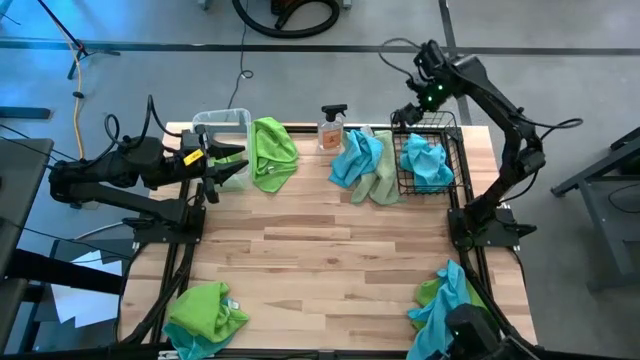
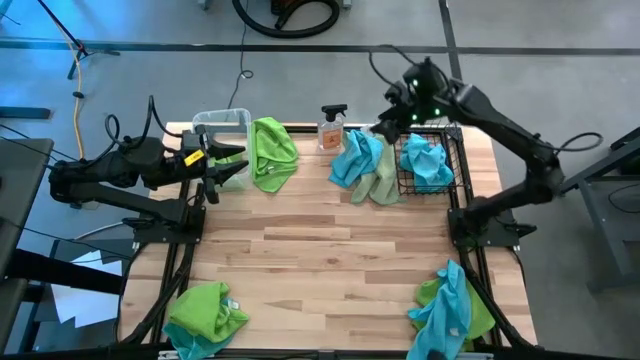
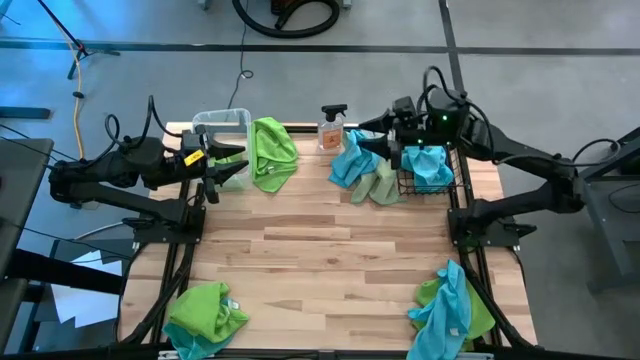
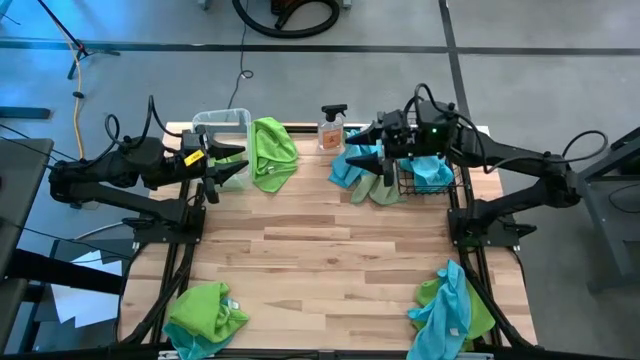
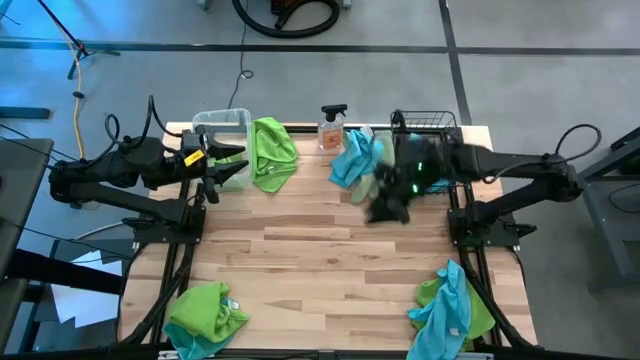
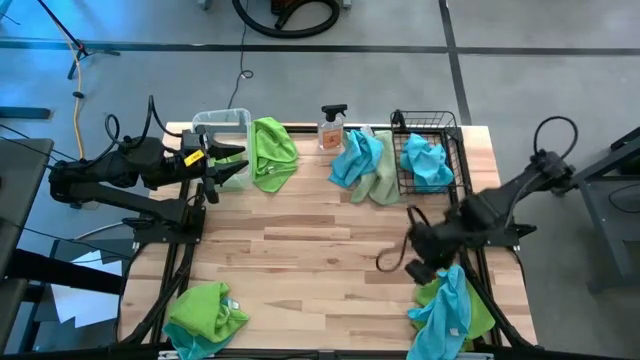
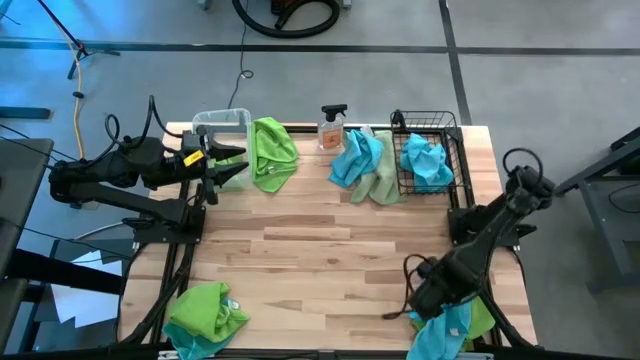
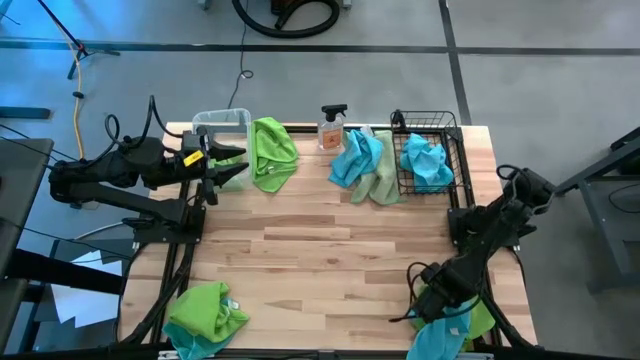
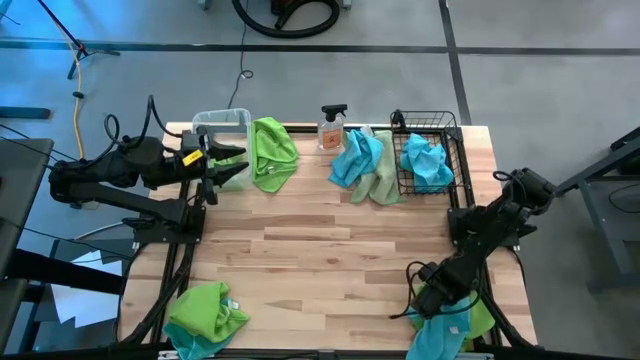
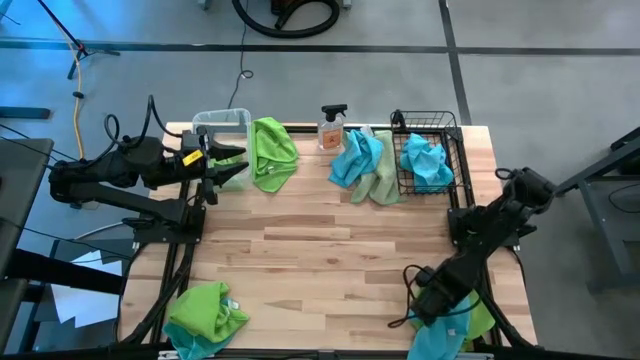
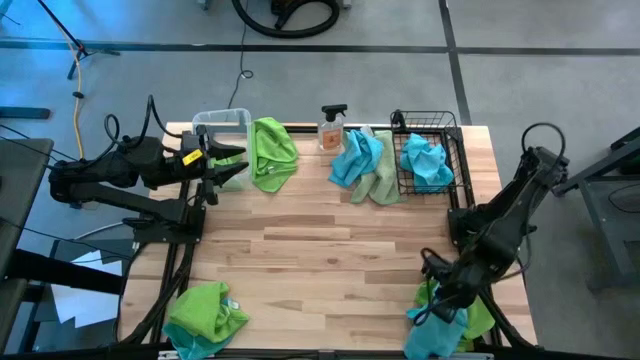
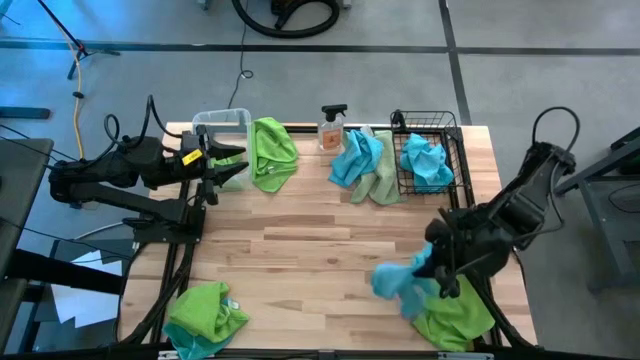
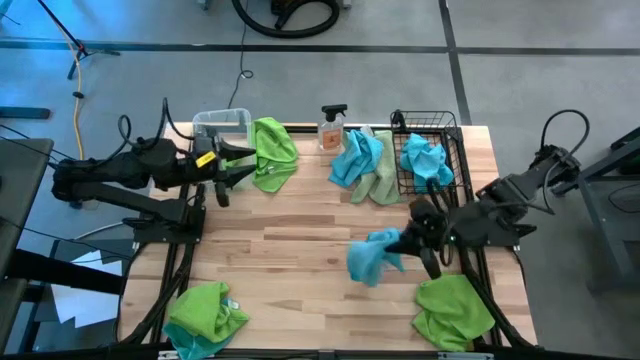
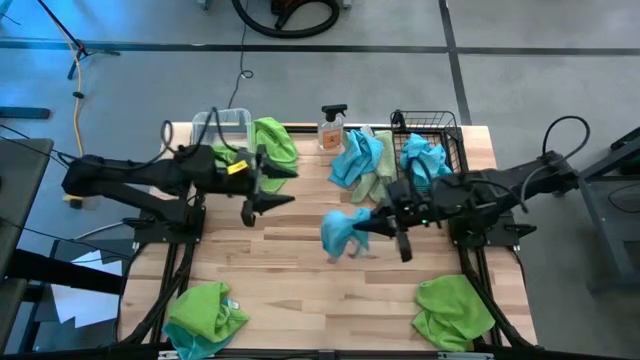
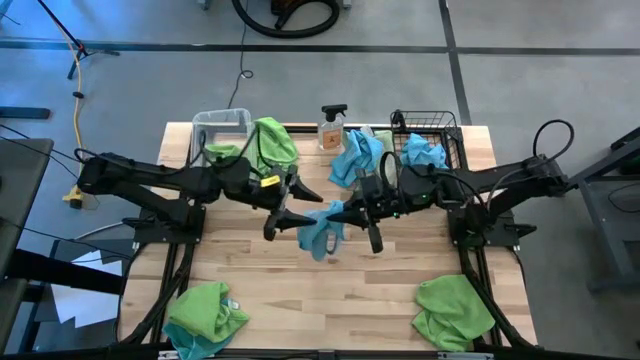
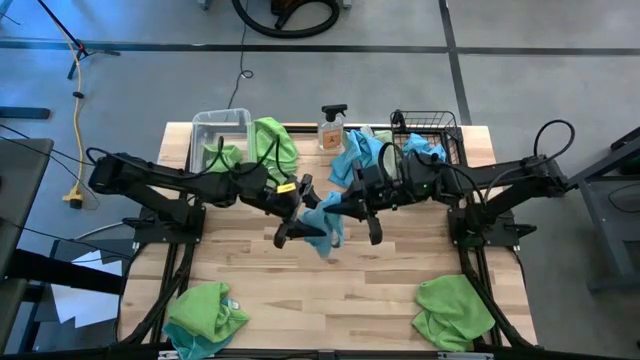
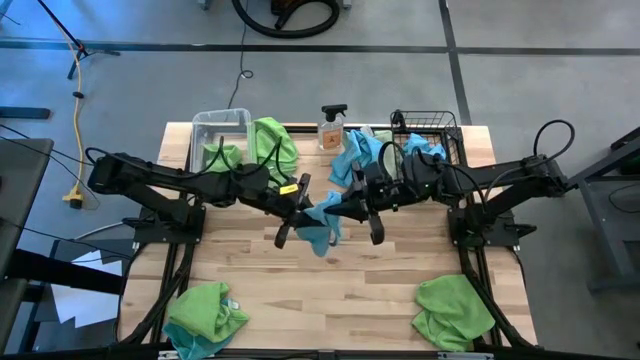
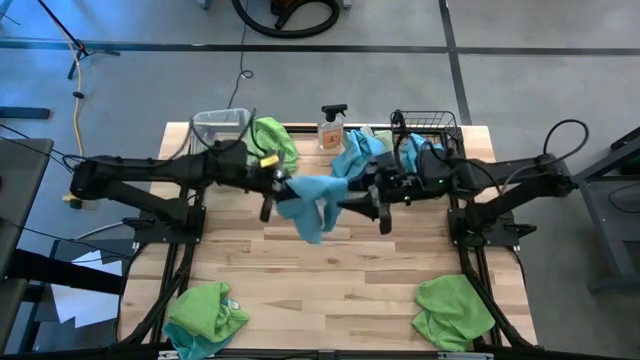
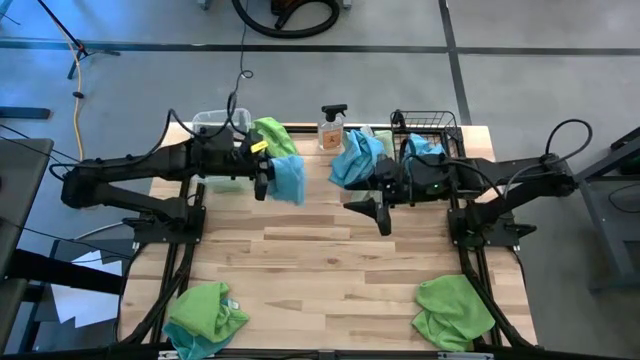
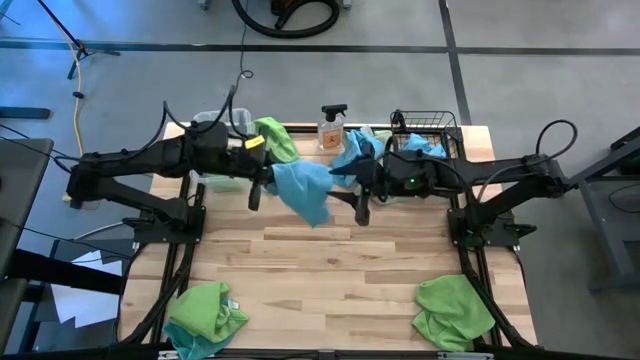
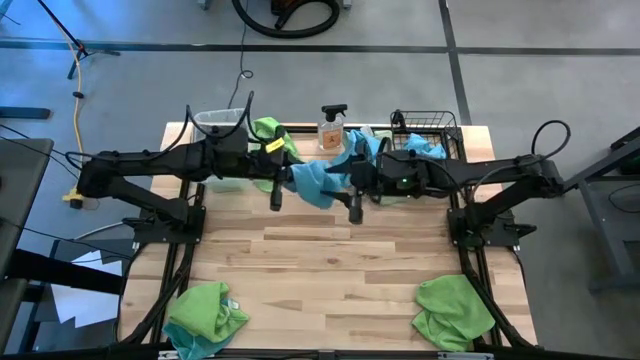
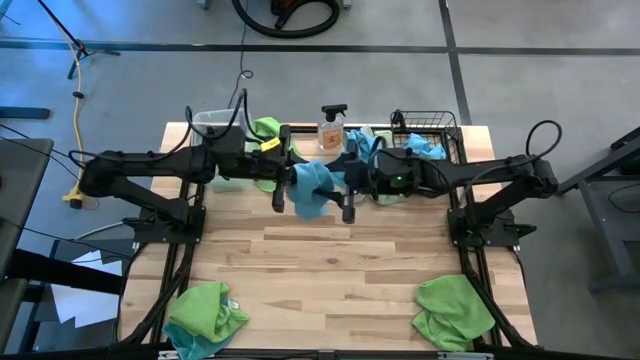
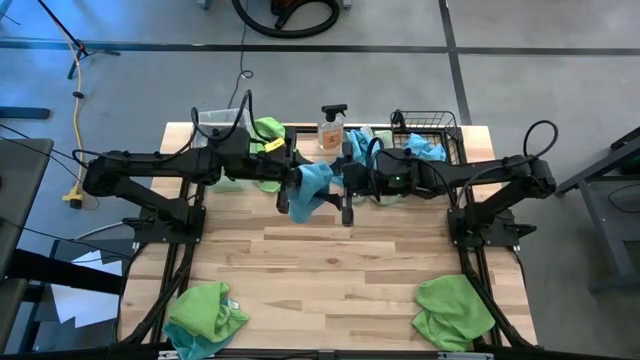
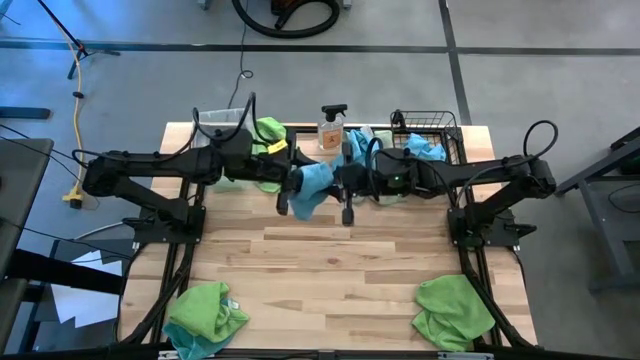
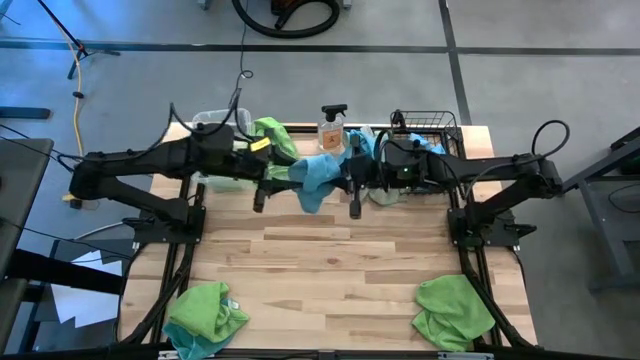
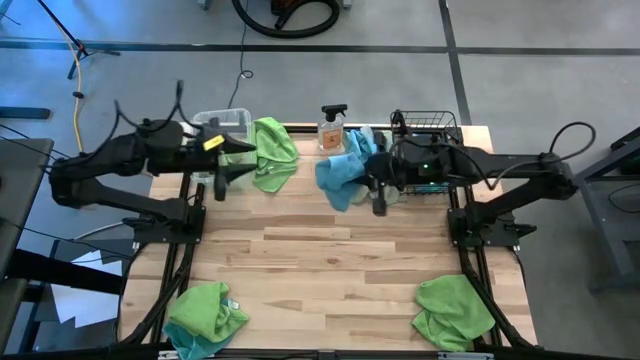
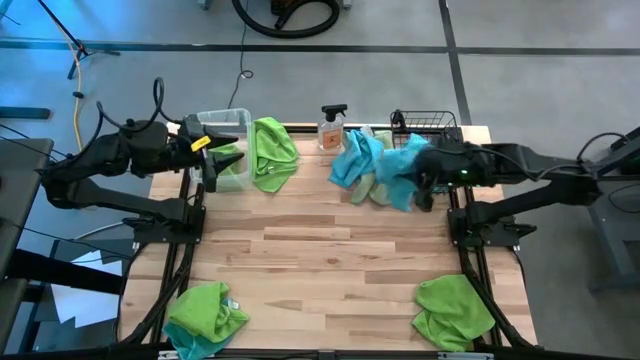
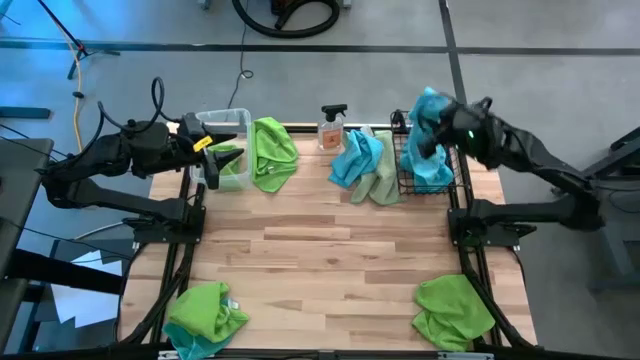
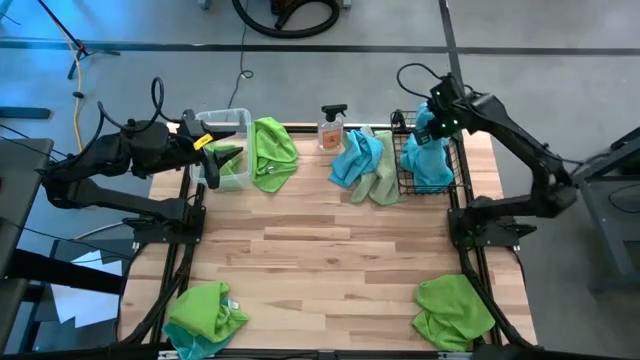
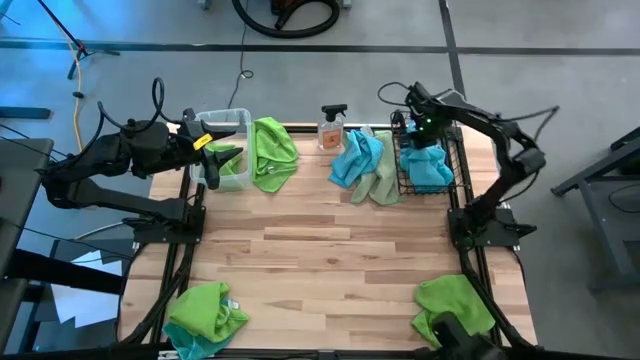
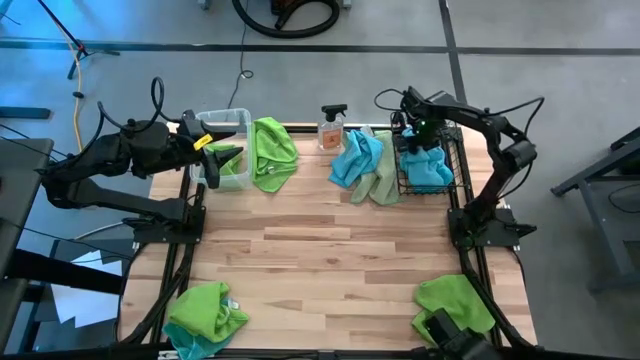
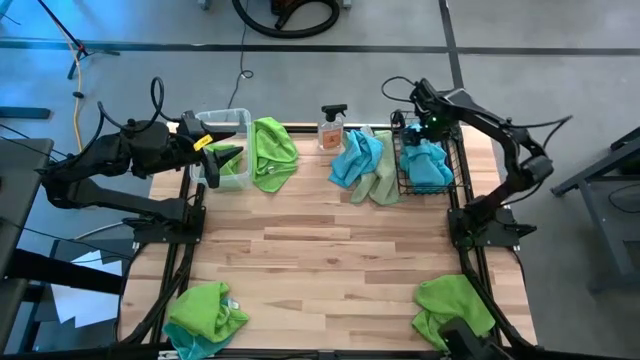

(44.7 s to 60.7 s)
Task: Sort microfiber towel by color & place in baskets
Put the blue microfiber cloth into the basket

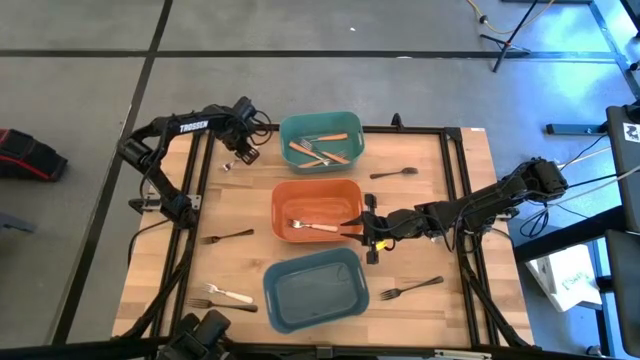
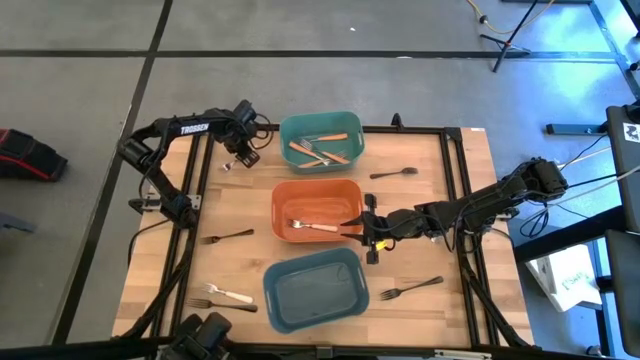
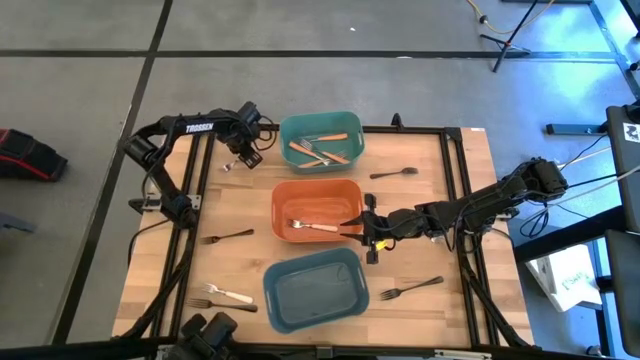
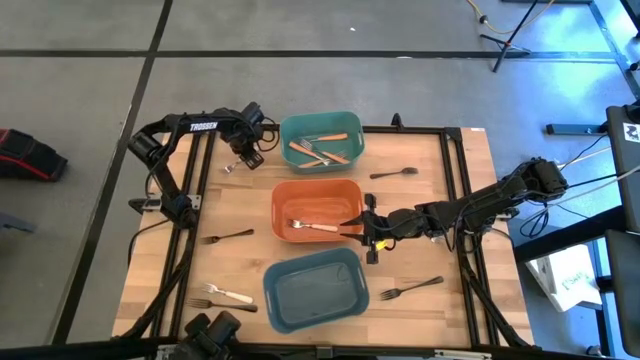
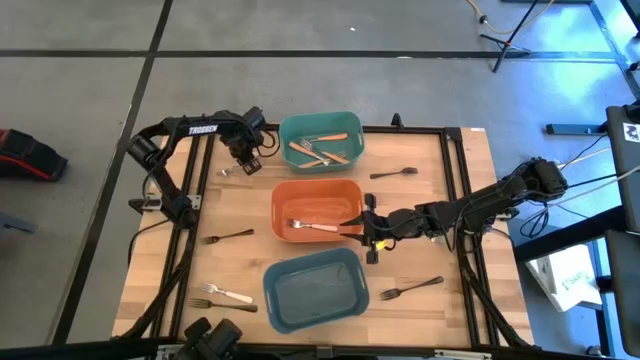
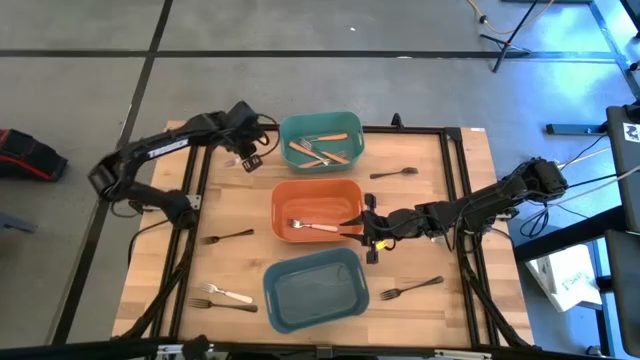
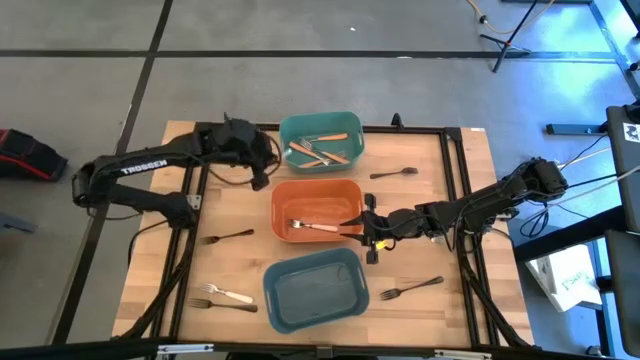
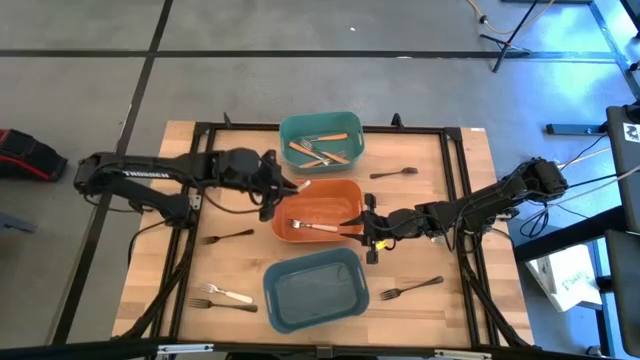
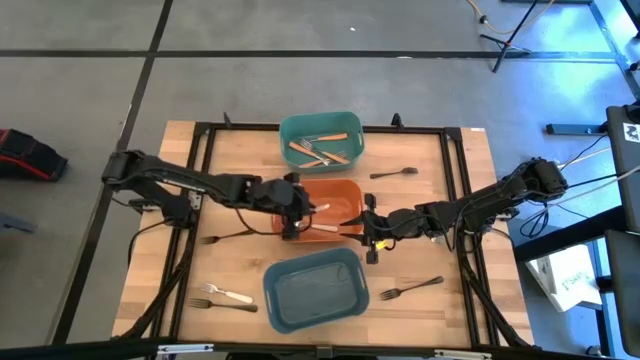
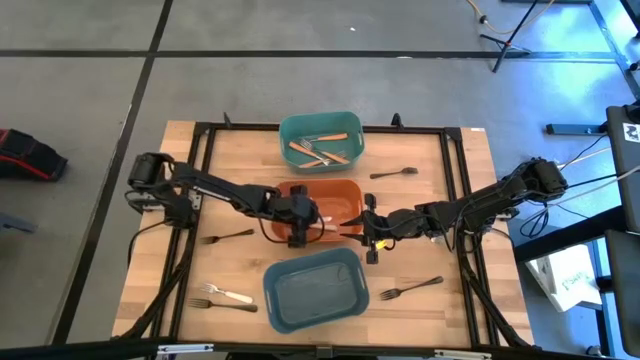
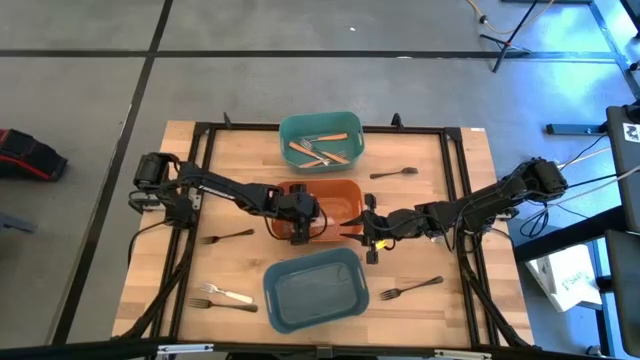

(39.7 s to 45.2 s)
Task: Sort silverware by color (type)
Put the white fork into the orange bin
